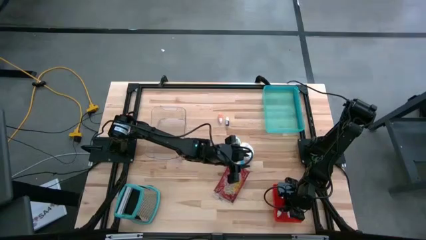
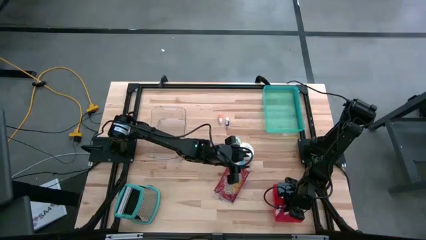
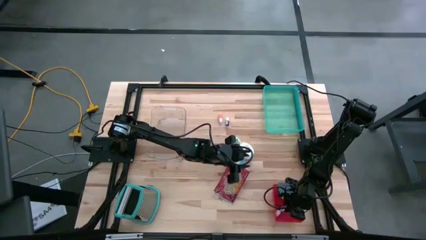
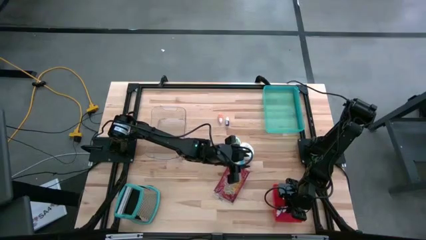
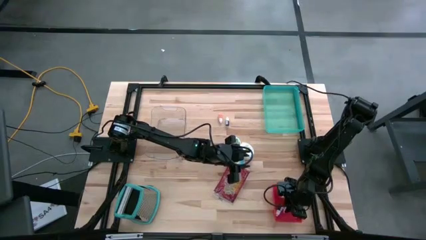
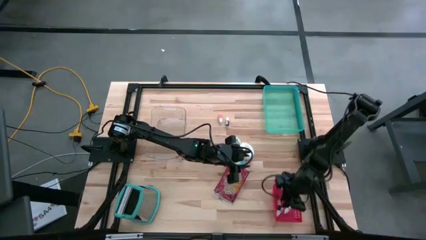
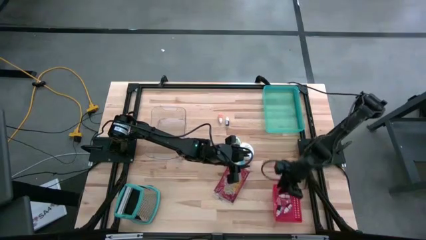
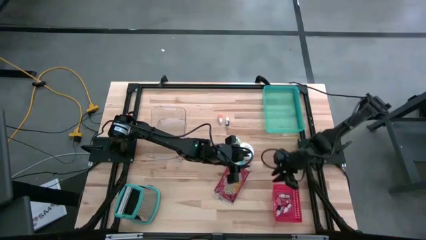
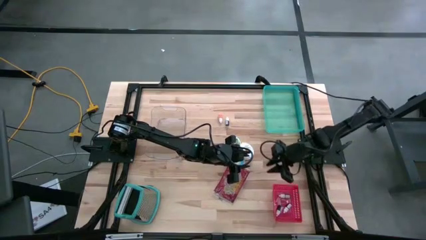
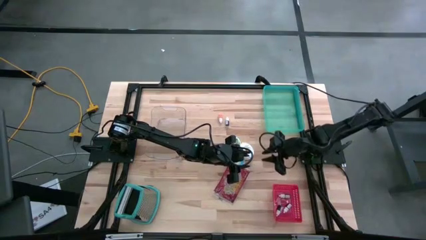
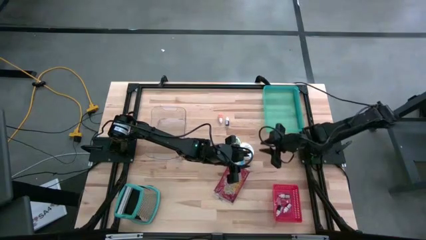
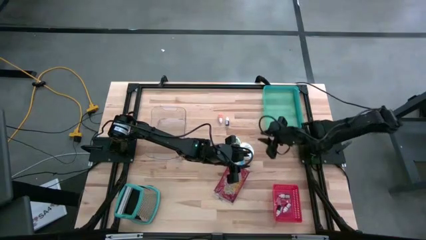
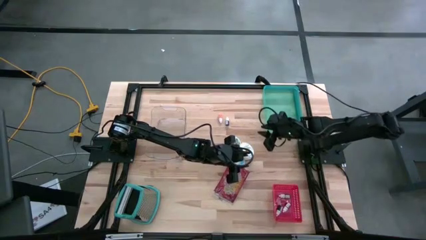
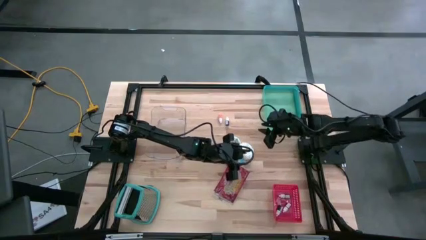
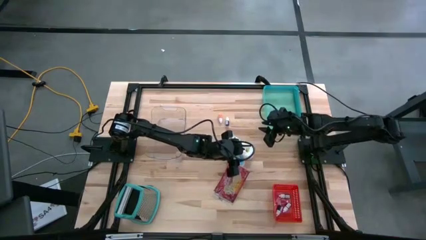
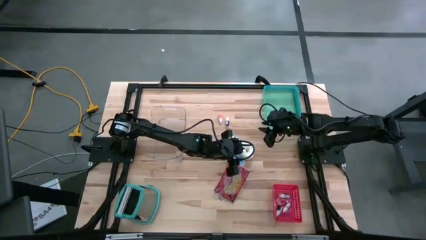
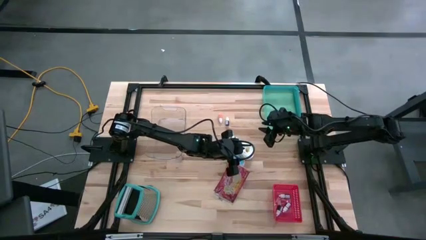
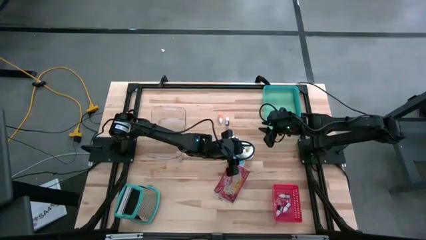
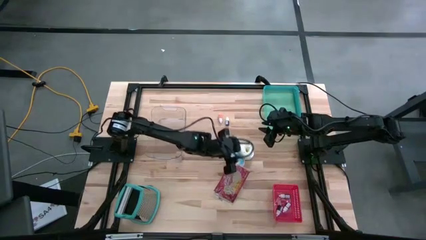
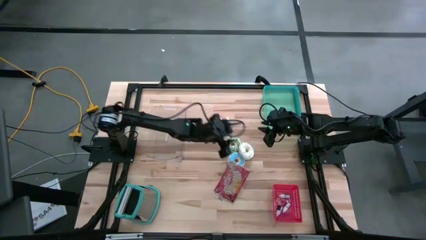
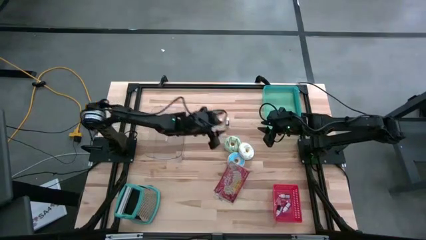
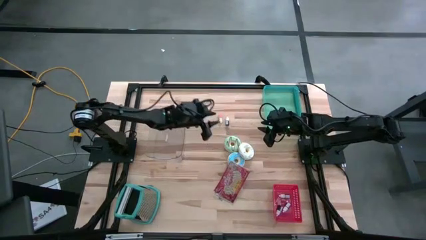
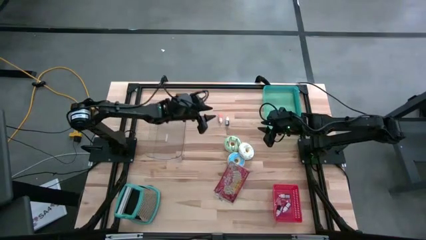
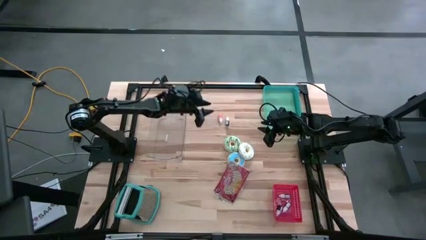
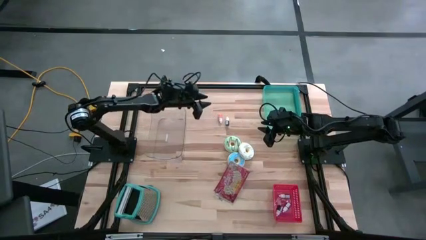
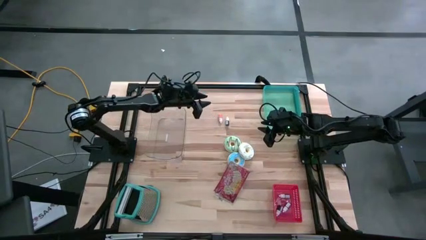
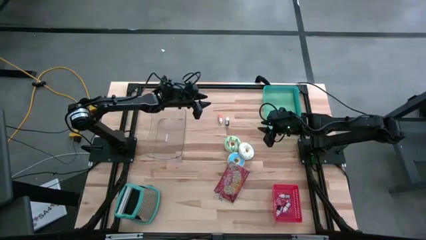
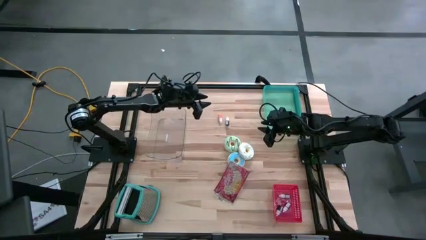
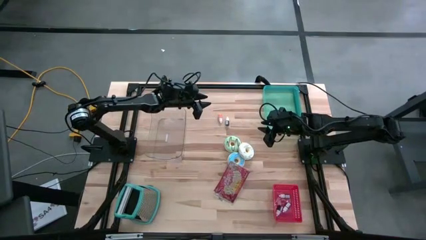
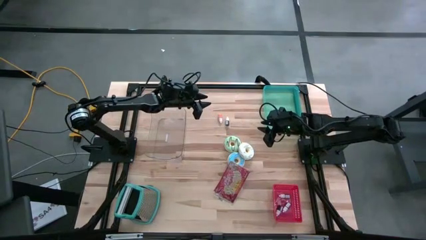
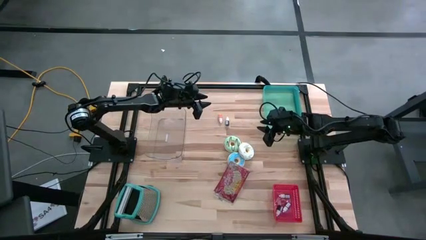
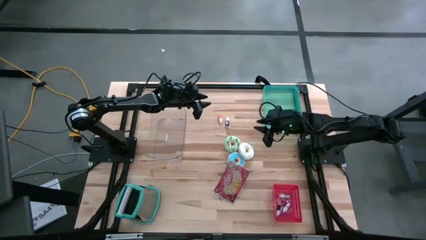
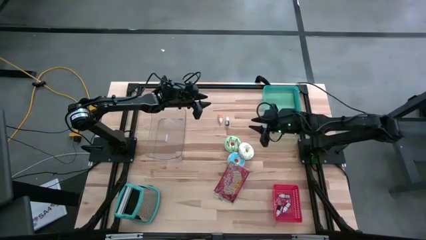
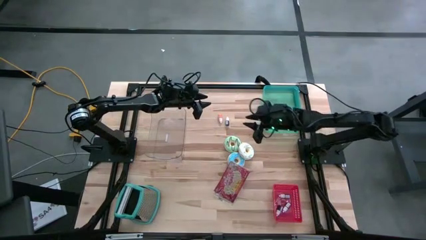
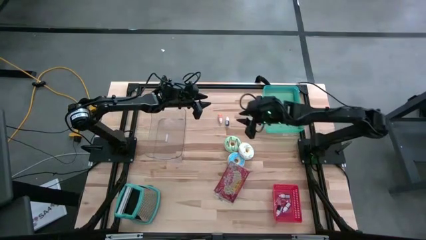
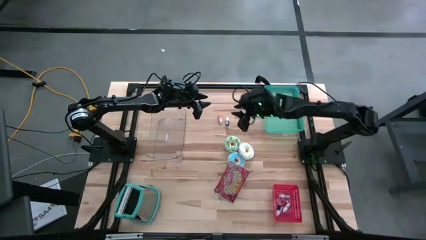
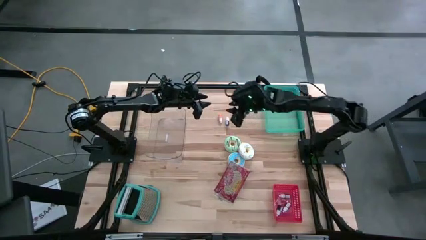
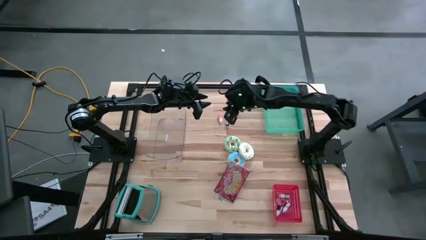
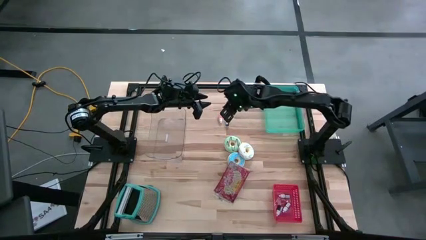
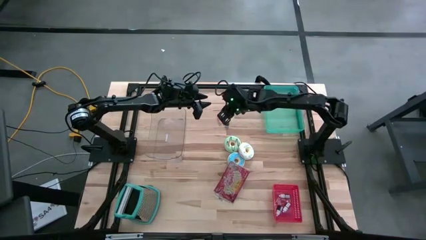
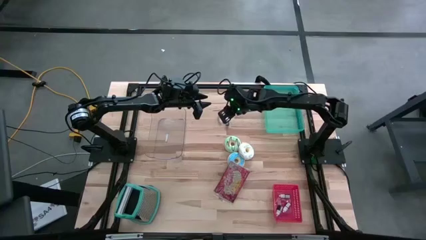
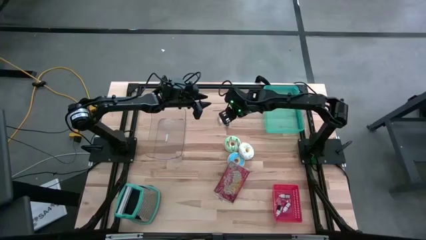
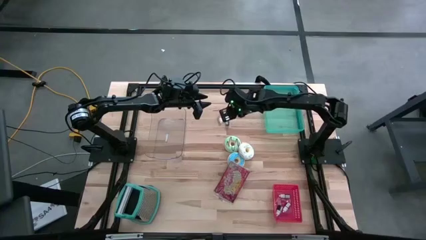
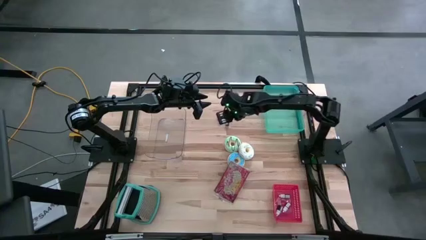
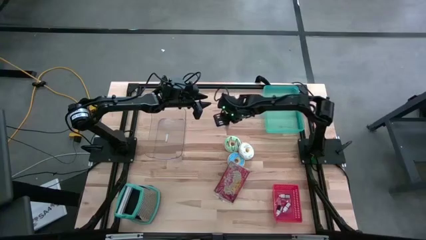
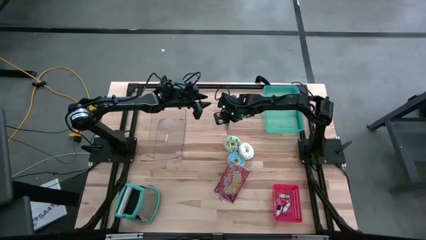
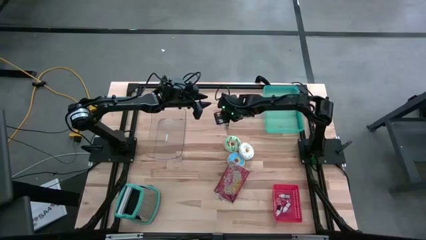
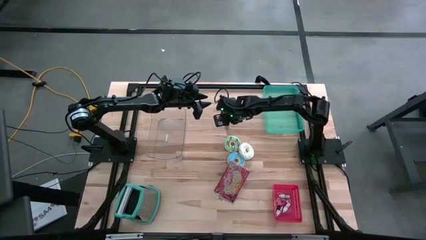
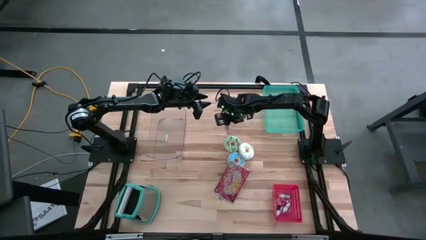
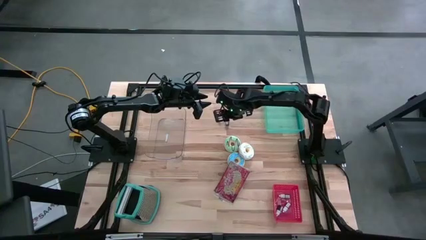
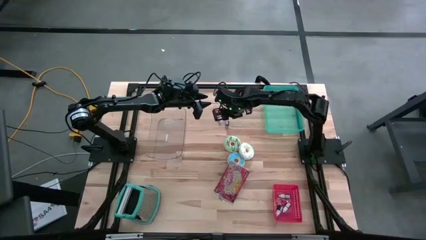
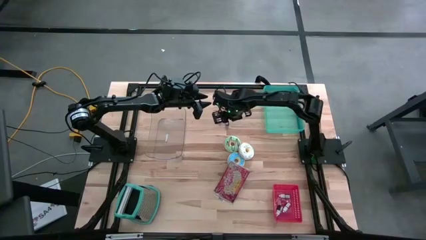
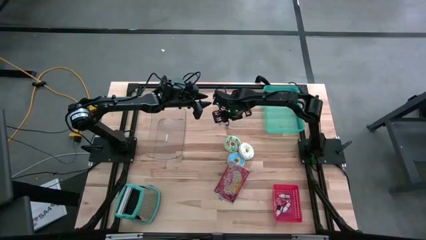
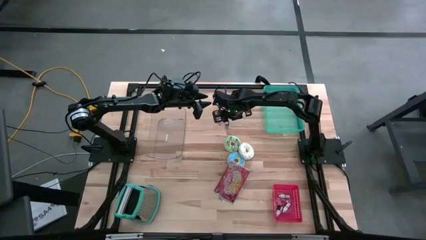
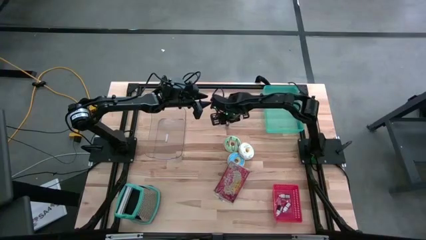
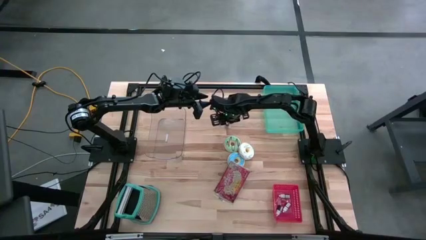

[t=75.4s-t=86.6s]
Put the dark red food coloring bottle into the red bin
